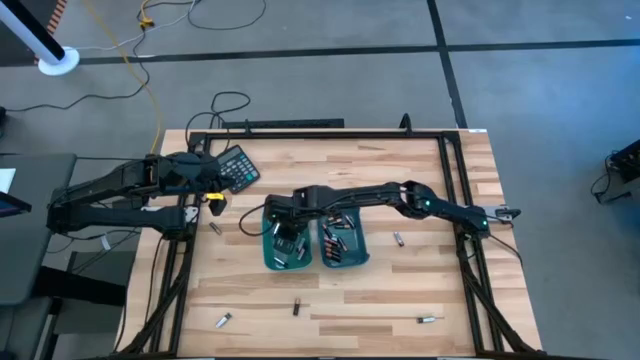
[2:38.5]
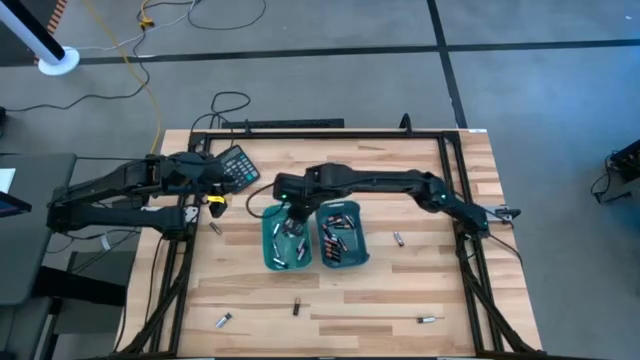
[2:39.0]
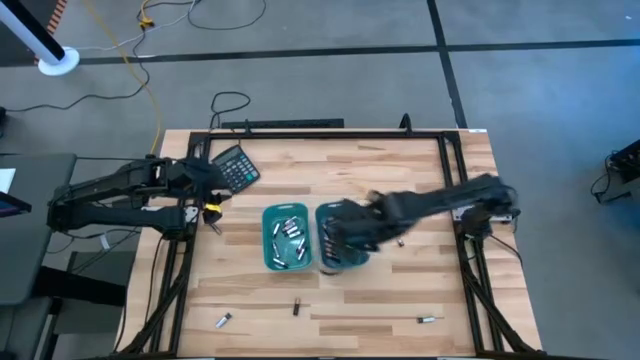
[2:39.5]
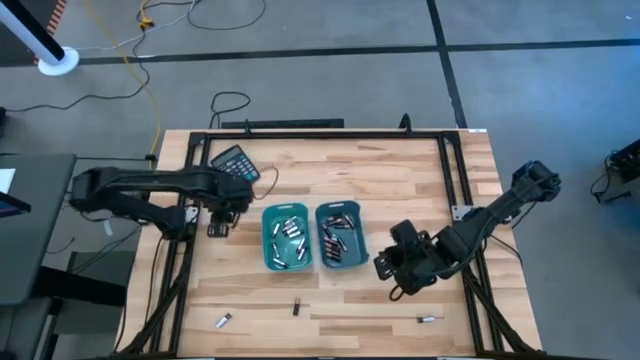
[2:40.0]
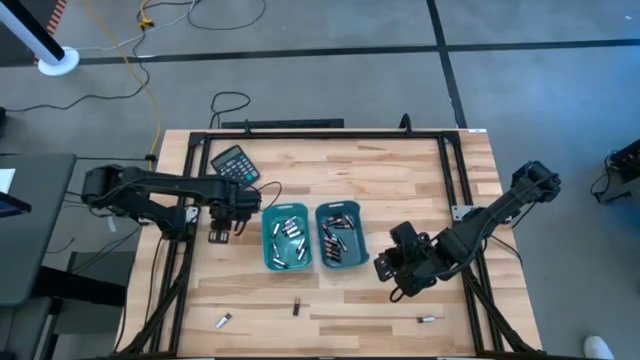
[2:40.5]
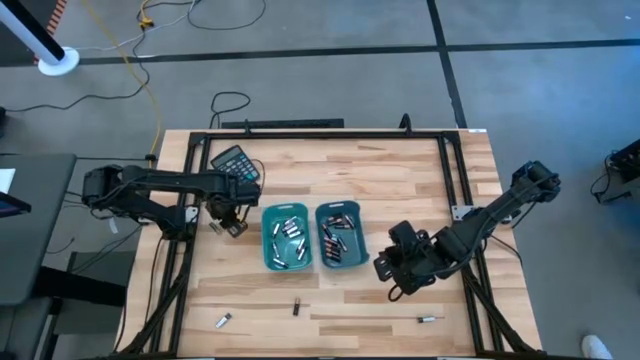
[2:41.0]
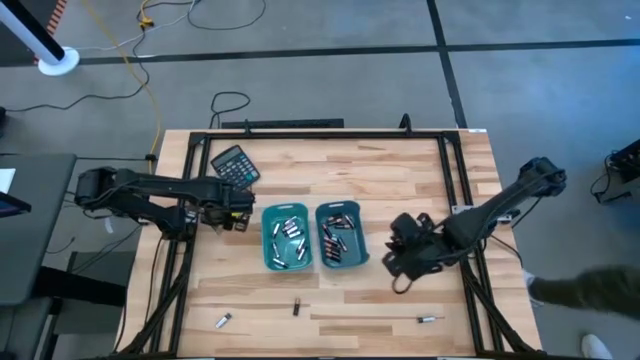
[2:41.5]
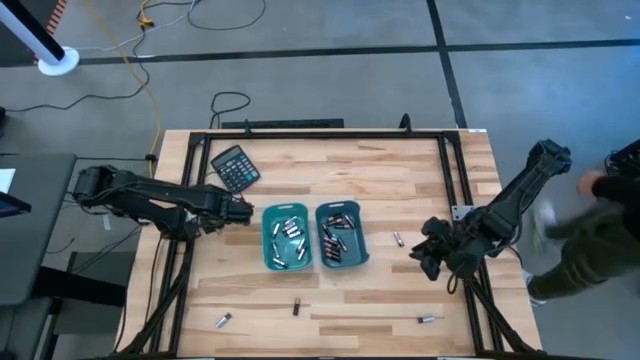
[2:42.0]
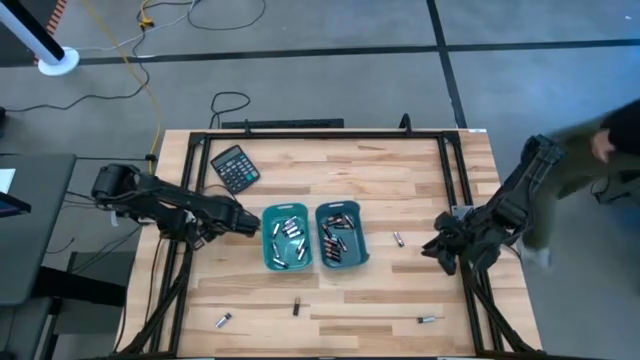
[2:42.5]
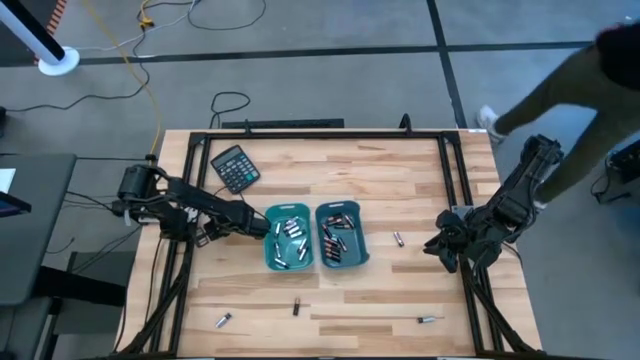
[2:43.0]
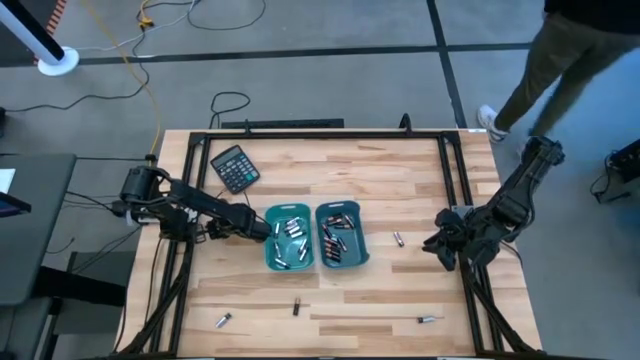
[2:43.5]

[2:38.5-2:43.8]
Task: Sort batteries
Put the black battery into the blue bin

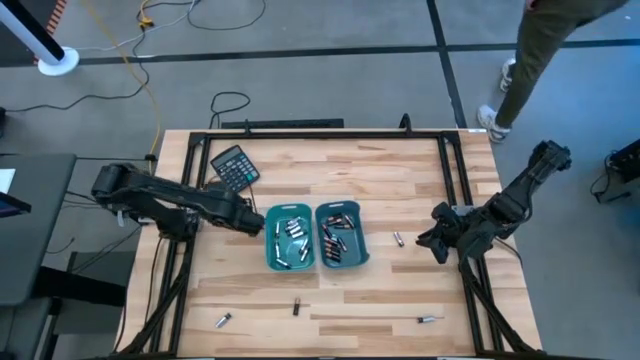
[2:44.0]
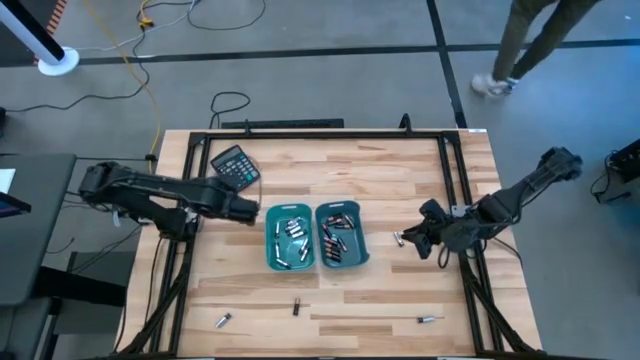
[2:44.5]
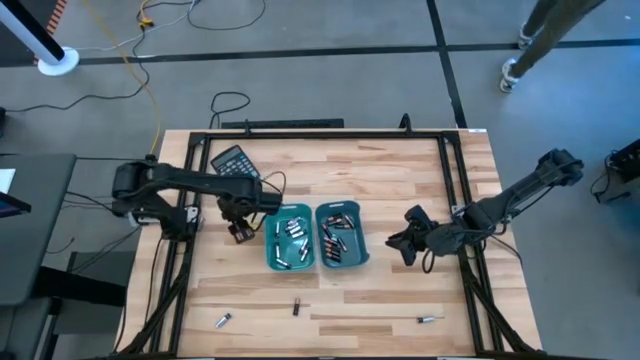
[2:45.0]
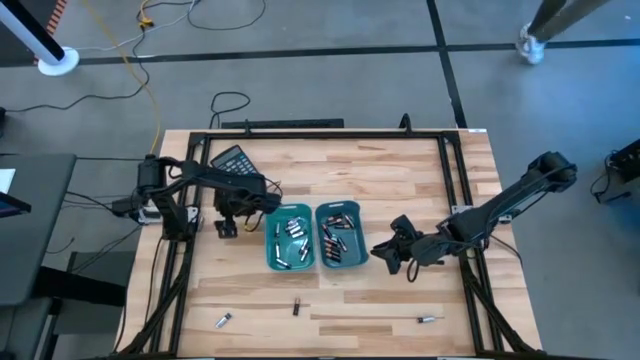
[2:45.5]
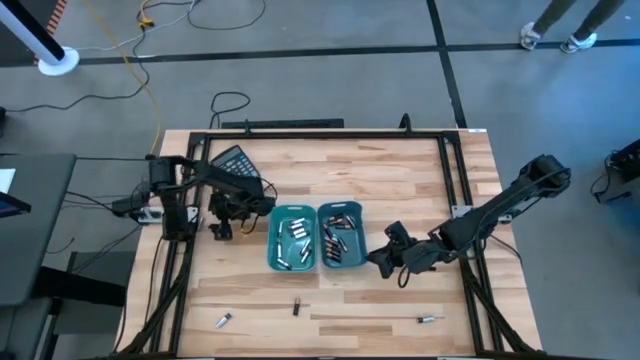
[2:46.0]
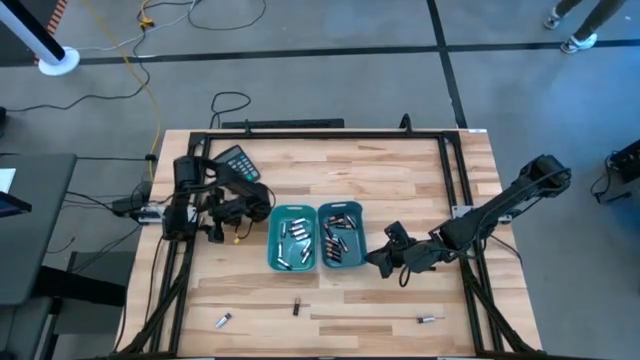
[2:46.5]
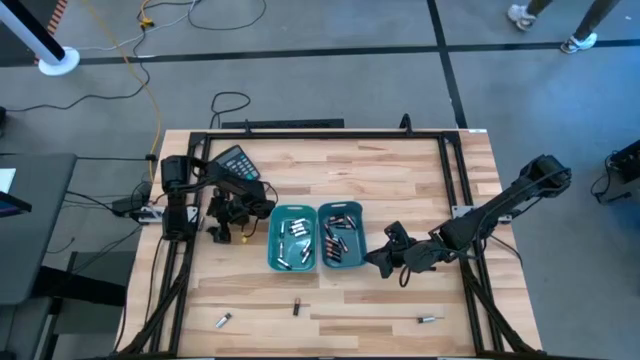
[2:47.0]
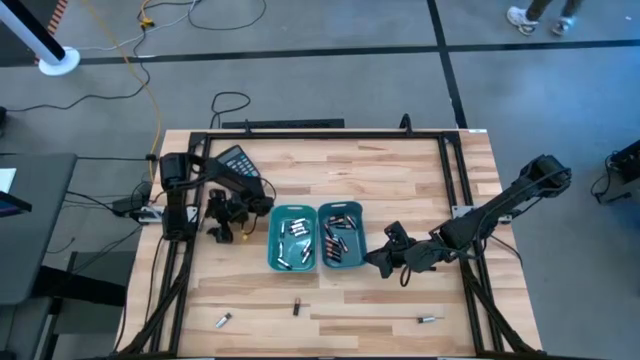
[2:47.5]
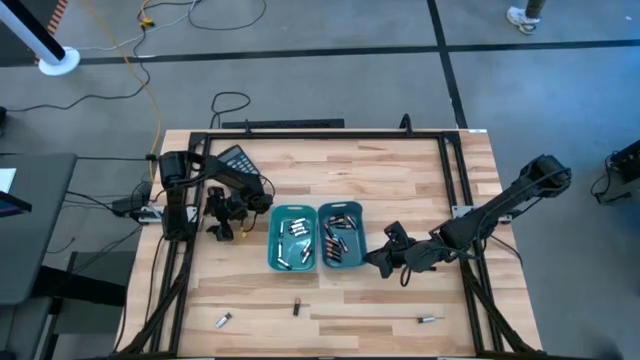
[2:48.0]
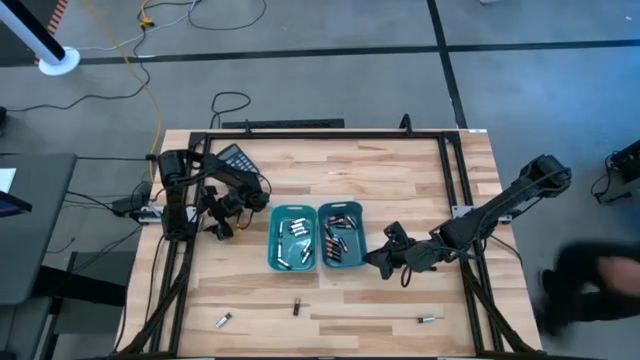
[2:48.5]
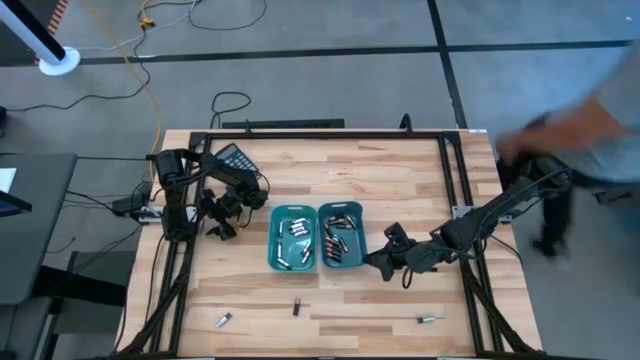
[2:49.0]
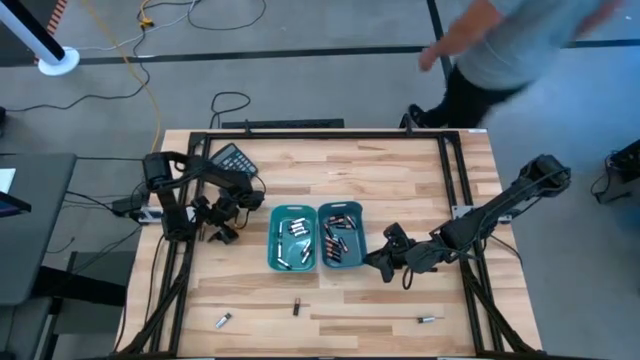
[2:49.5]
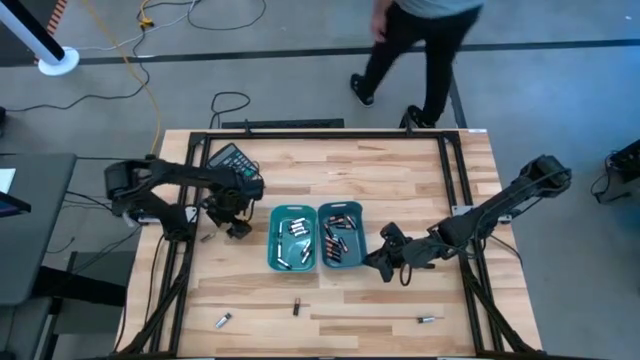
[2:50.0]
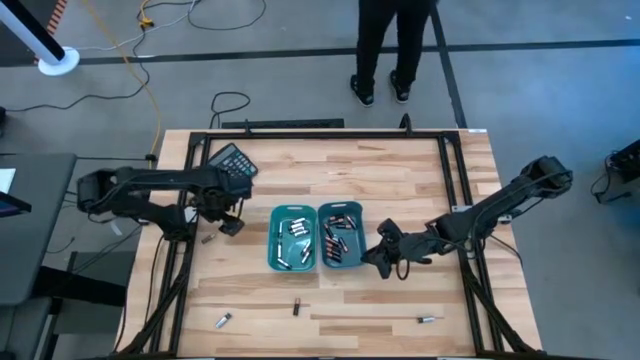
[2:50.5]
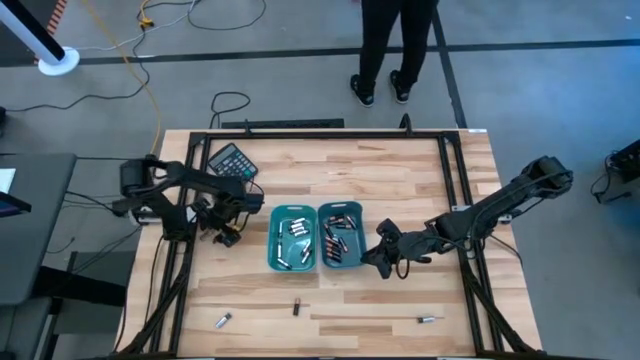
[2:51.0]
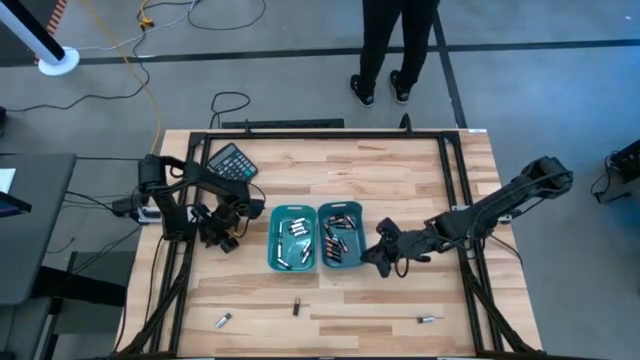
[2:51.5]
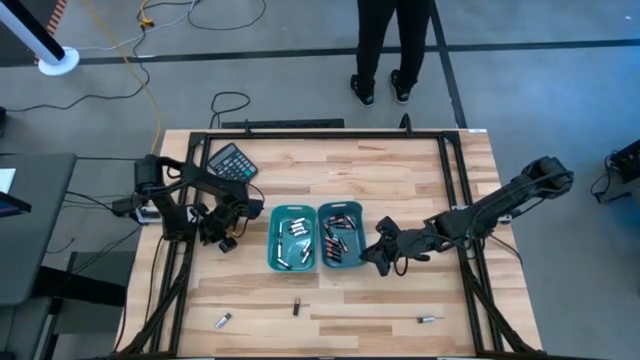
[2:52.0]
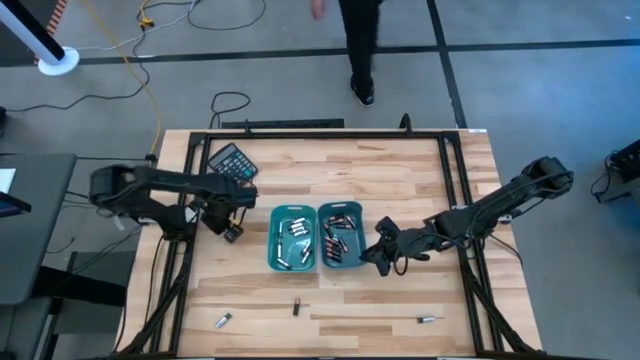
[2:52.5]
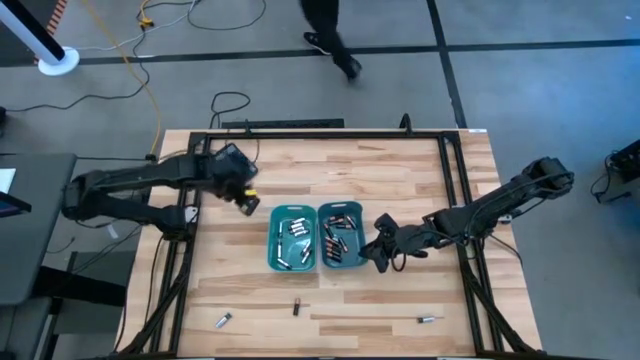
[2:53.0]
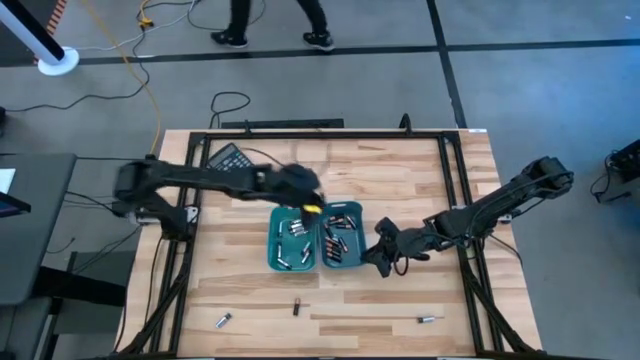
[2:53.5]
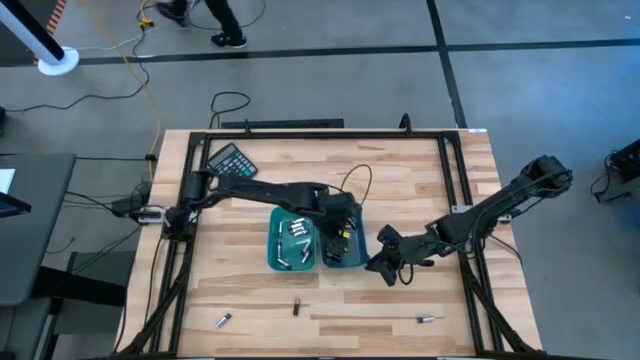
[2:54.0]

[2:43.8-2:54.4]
Put the black battery into the blue bin

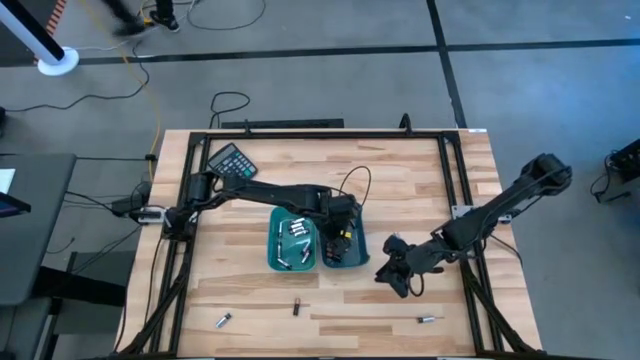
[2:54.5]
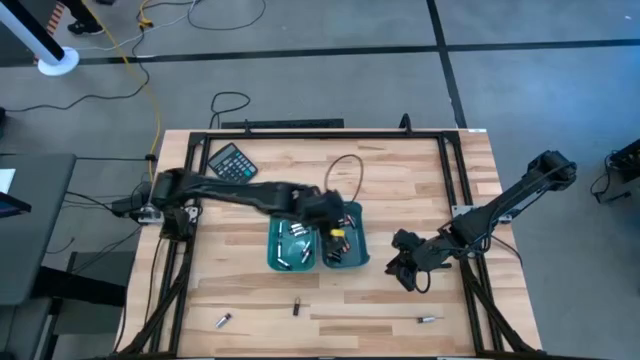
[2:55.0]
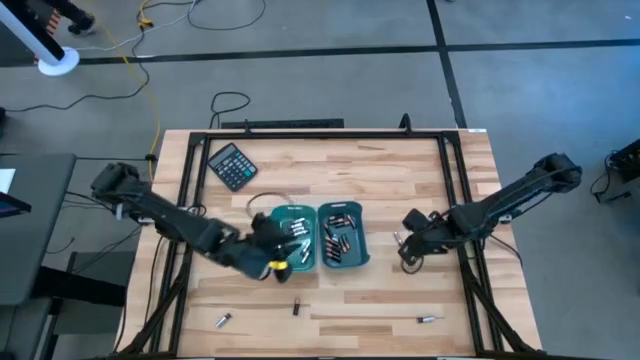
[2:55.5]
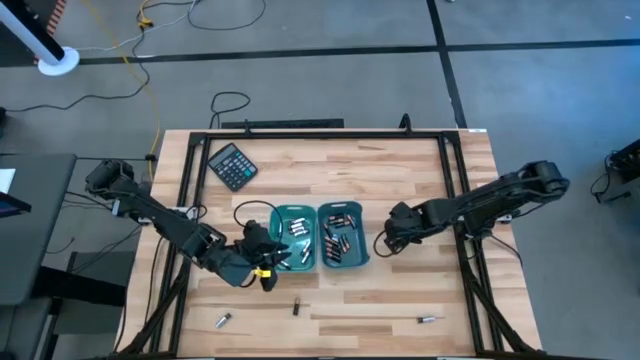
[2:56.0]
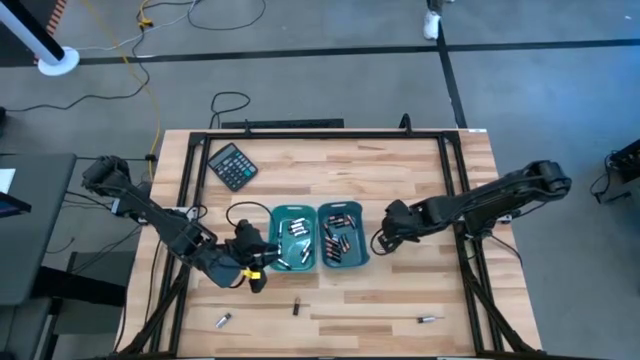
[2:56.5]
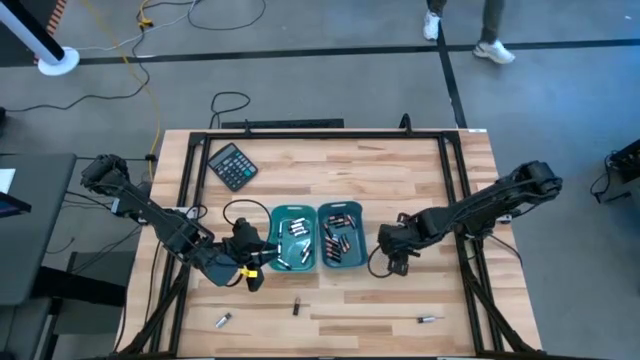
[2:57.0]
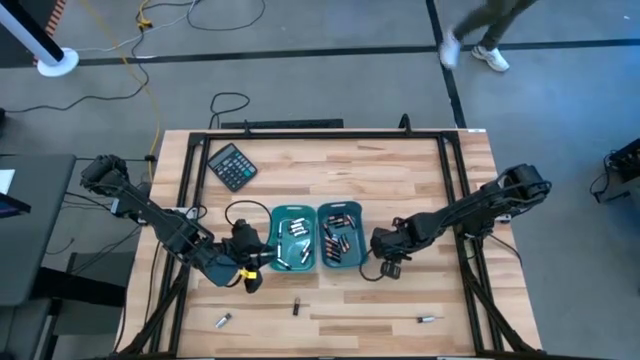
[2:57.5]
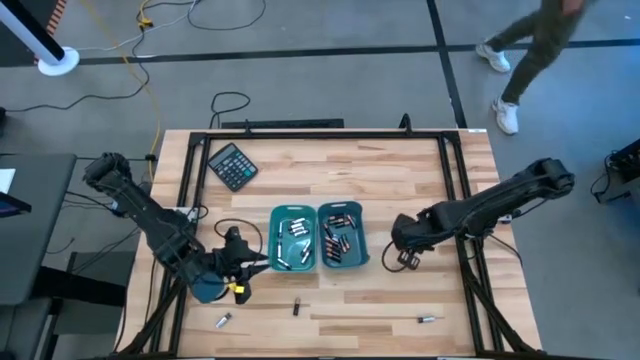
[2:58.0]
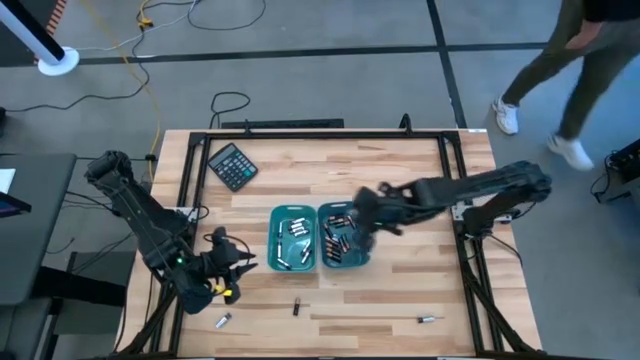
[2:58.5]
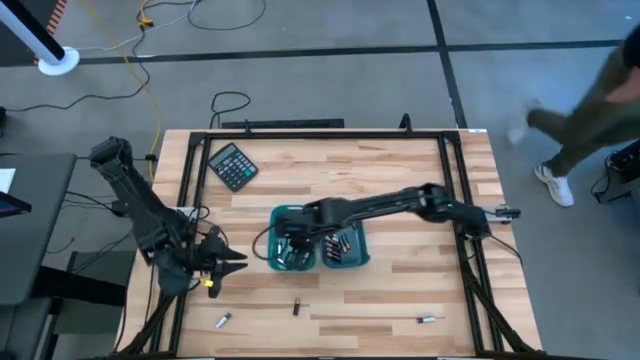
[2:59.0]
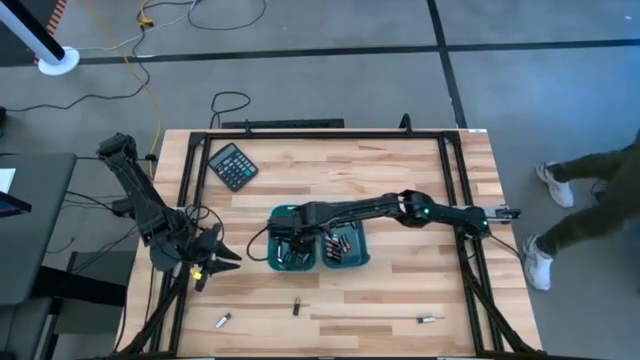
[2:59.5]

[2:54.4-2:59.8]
Put the silver battery into the green bin
